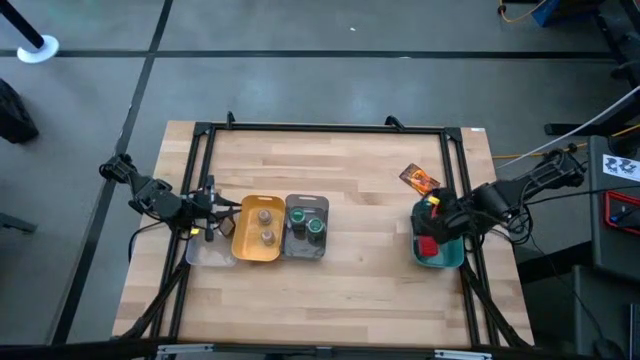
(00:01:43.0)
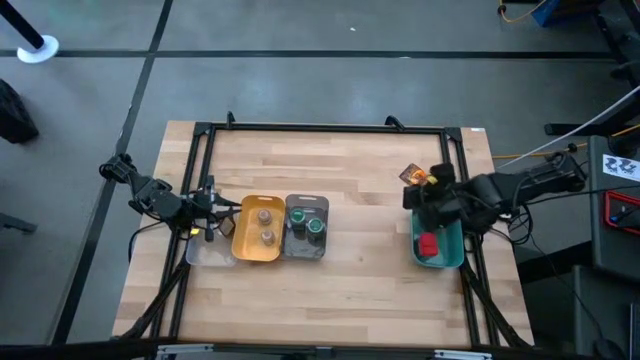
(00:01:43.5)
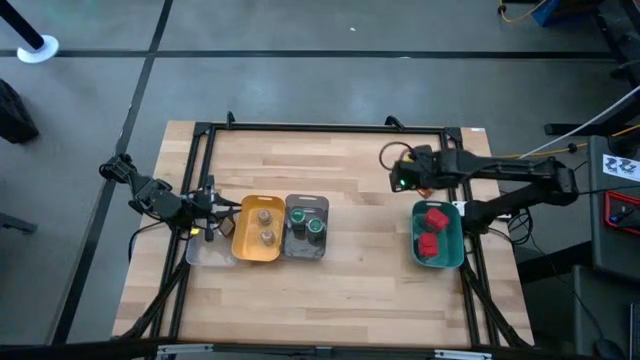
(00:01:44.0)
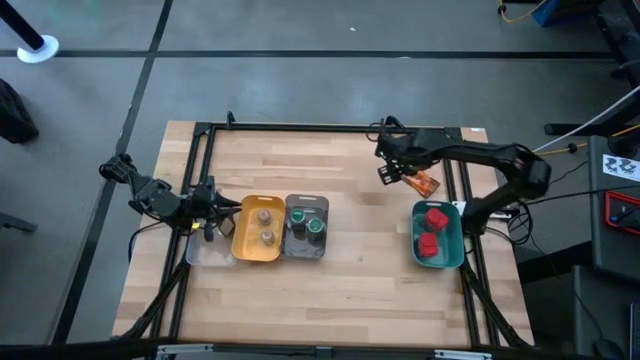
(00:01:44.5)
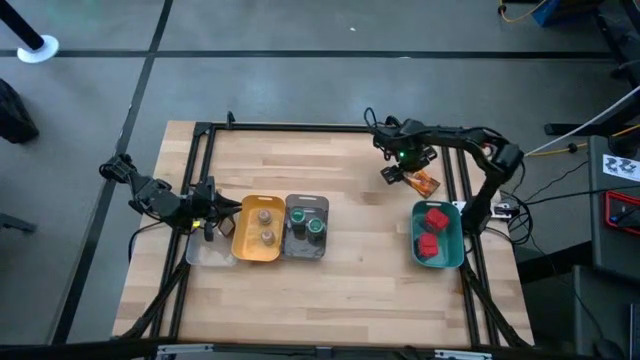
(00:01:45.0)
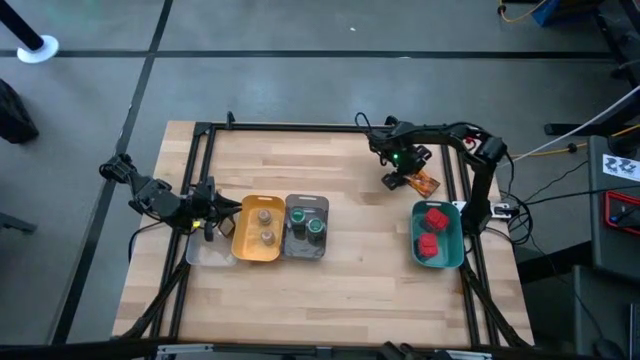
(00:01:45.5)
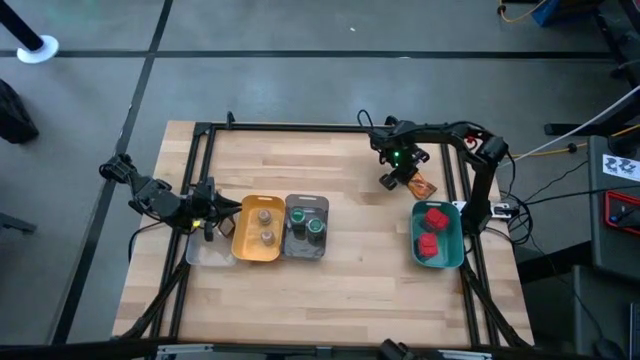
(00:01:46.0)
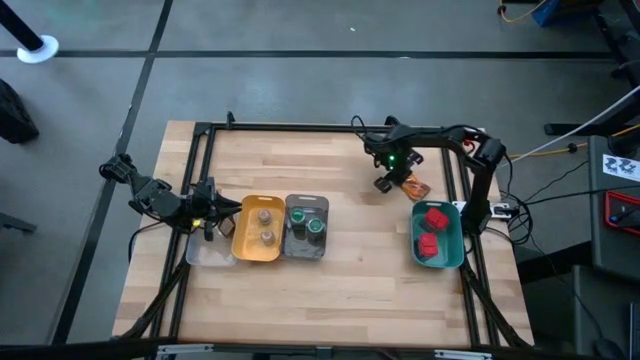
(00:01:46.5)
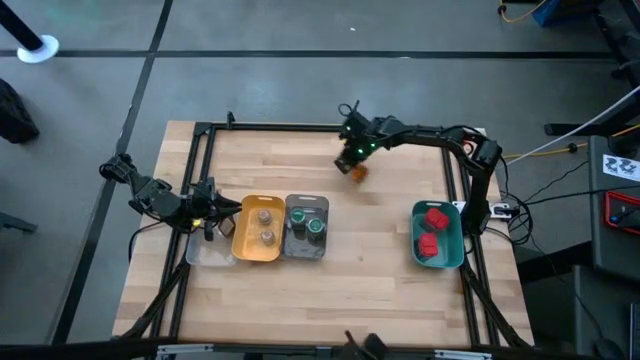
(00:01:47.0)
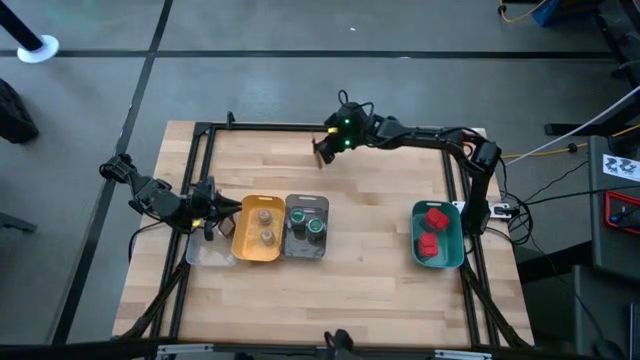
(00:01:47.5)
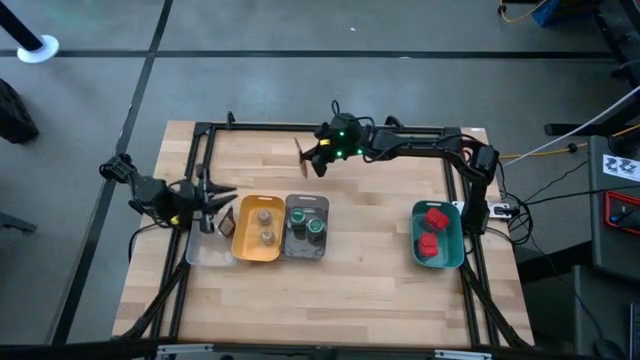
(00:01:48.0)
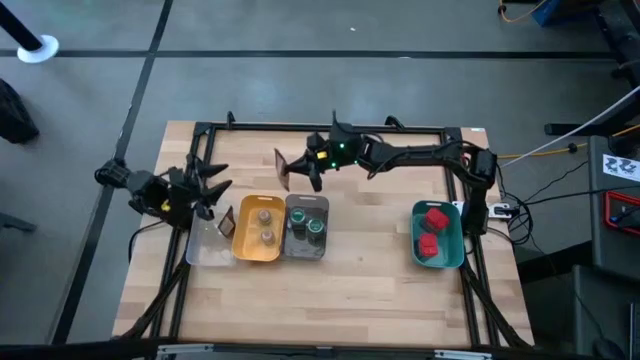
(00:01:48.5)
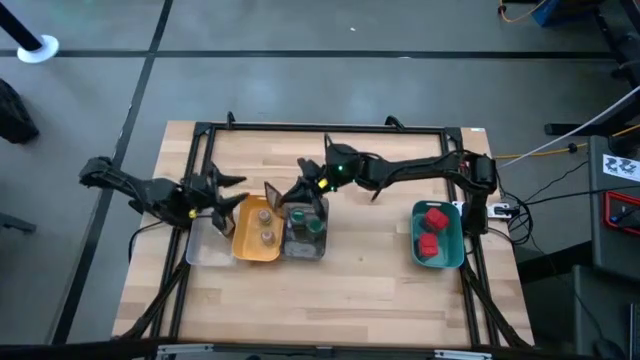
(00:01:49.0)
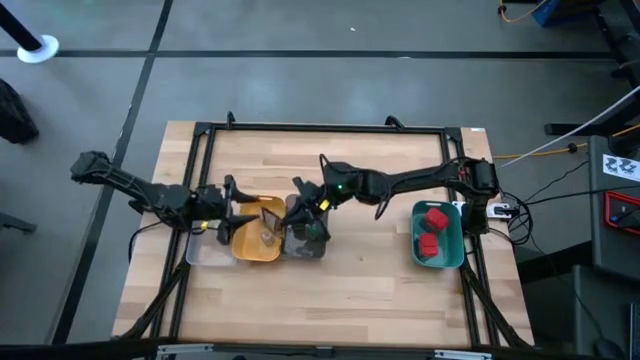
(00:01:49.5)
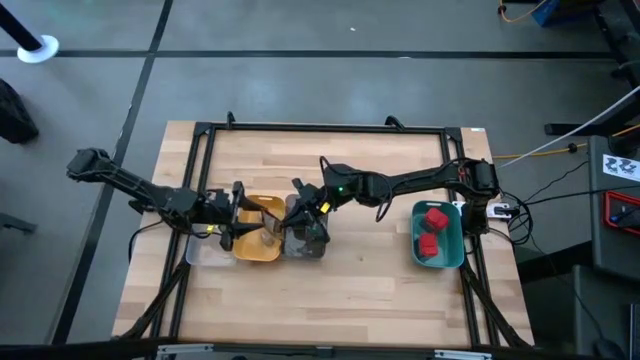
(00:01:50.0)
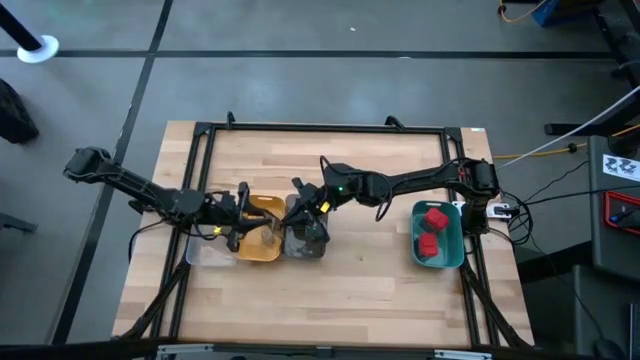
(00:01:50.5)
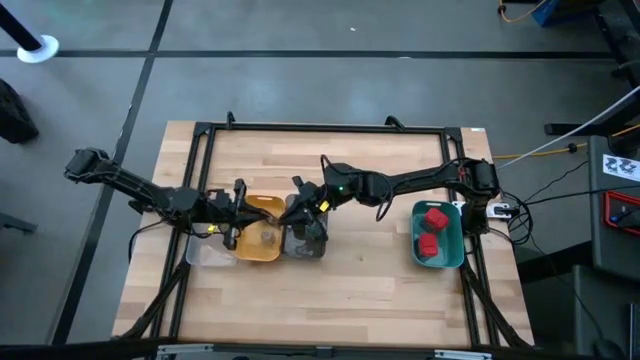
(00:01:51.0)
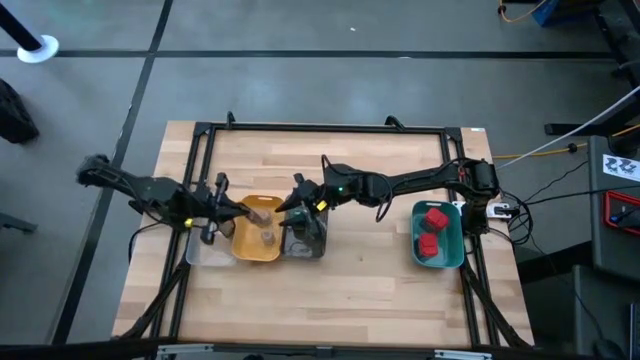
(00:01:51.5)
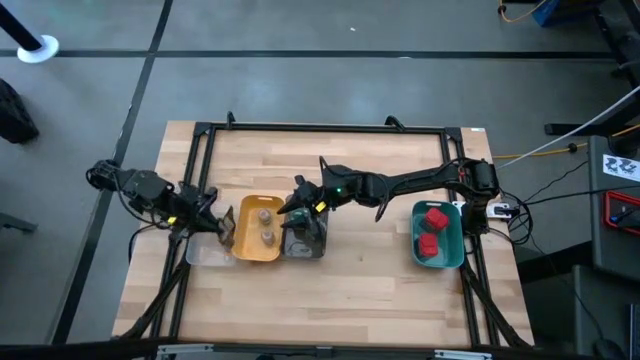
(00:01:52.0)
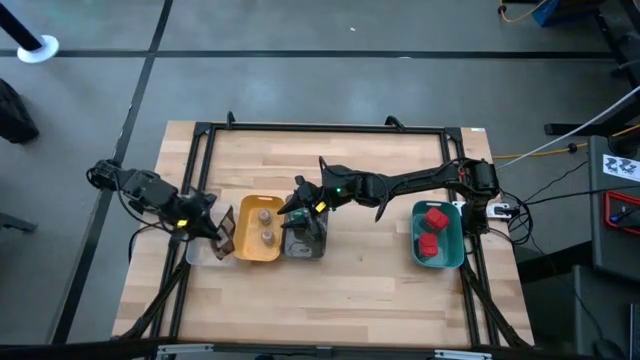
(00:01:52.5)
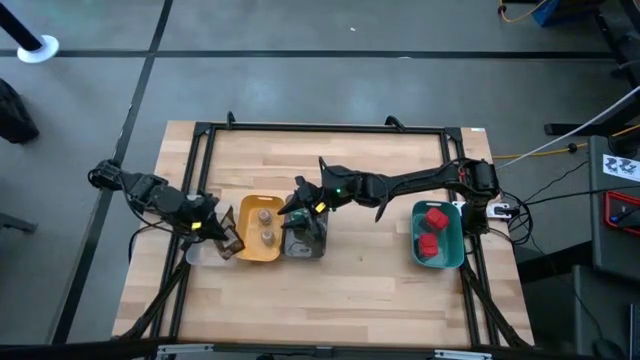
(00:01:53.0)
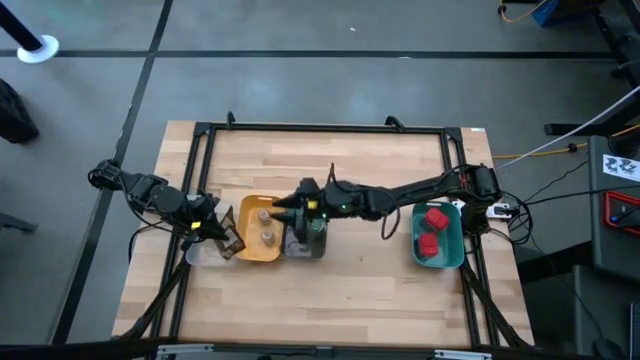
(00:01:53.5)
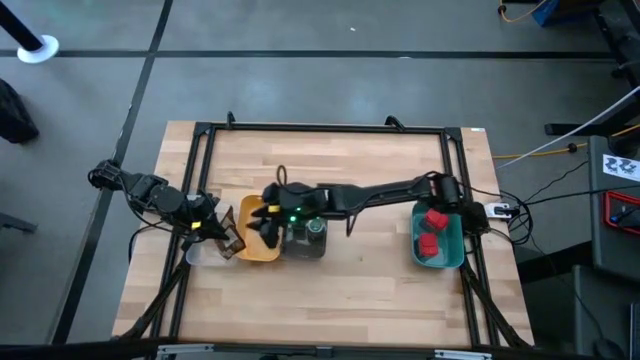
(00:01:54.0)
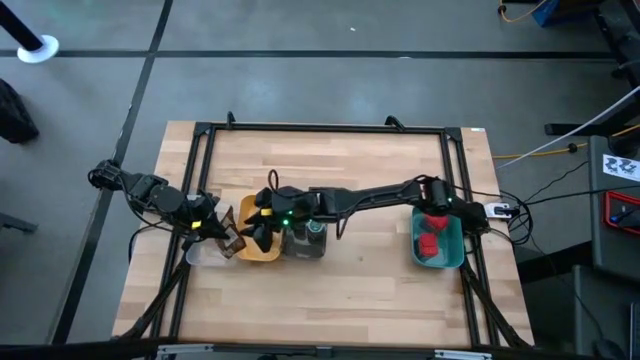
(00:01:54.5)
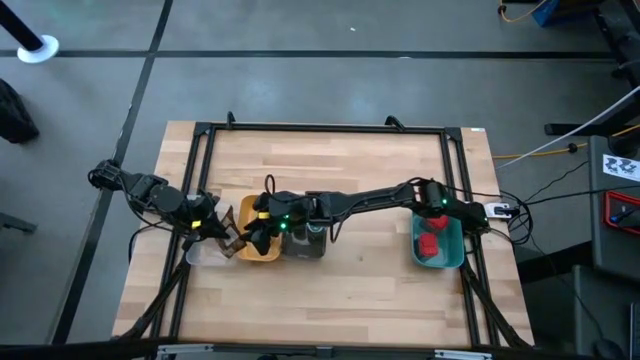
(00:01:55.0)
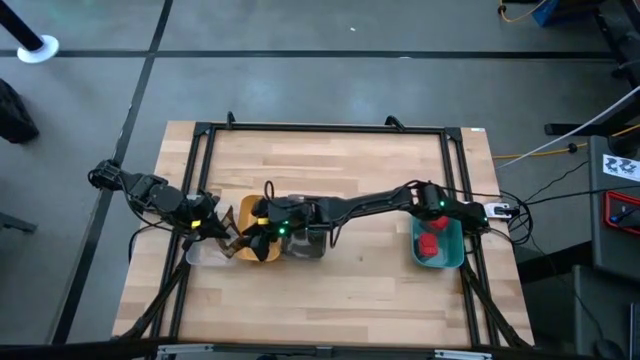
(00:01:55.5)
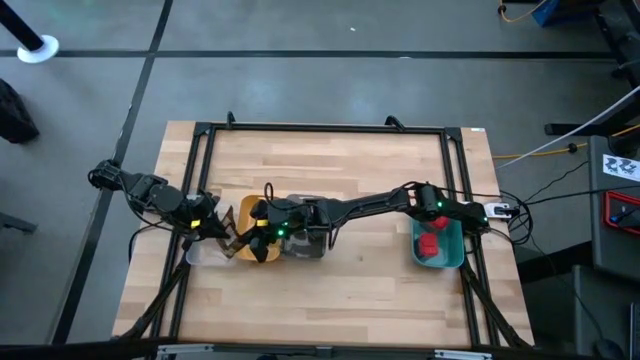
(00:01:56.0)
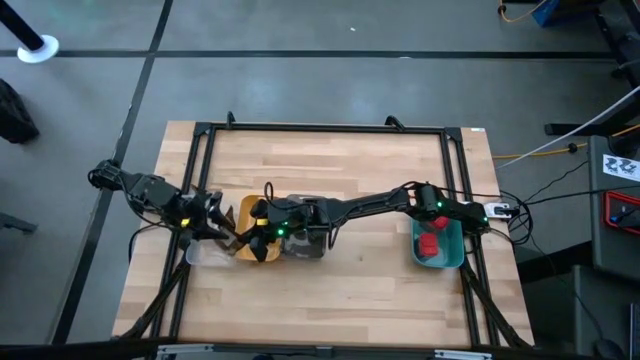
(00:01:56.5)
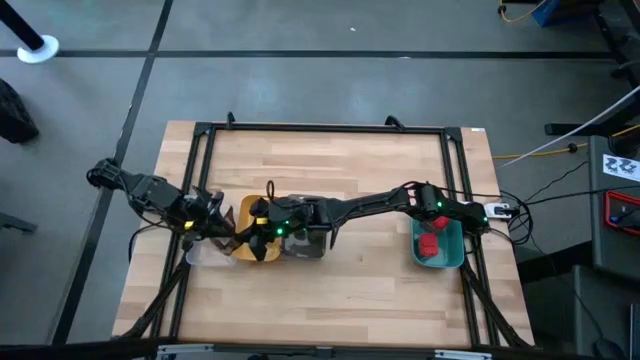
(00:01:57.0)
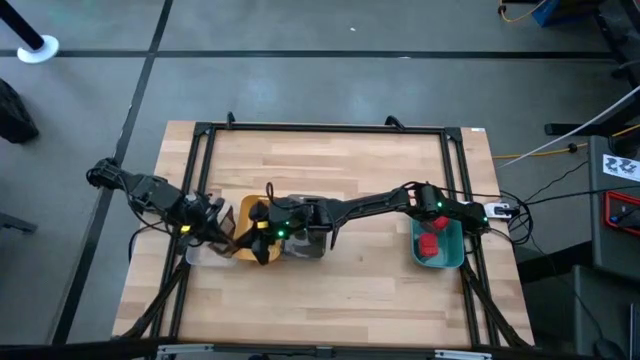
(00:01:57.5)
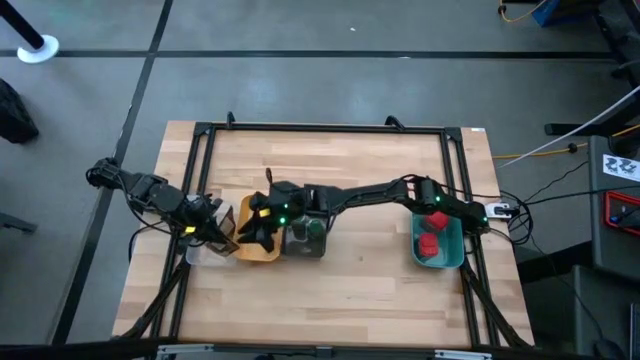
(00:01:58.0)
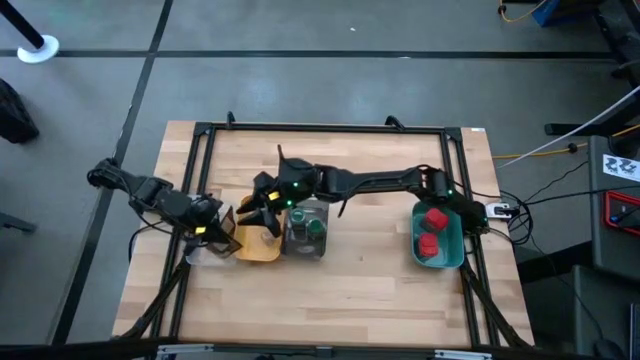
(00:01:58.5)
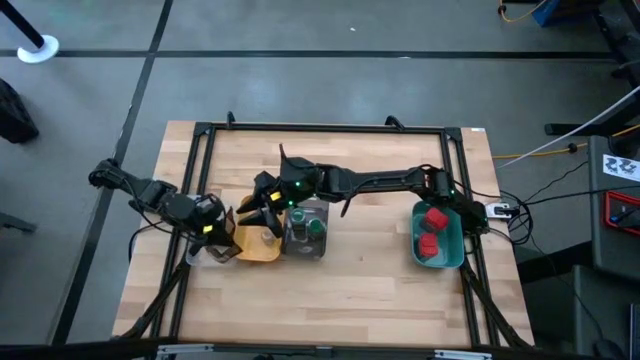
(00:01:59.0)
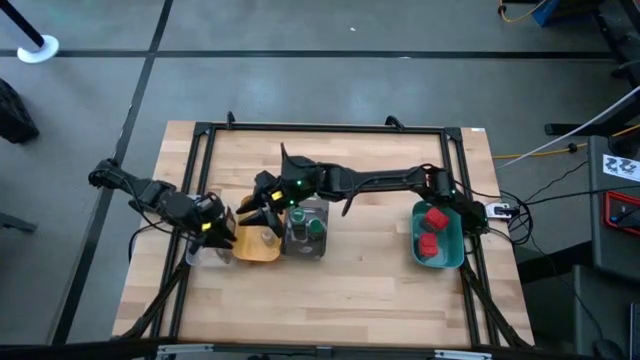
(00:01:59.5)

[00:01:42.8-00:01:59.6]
Task: Sort spices by type
Put the orange spice bag into the transparent bin

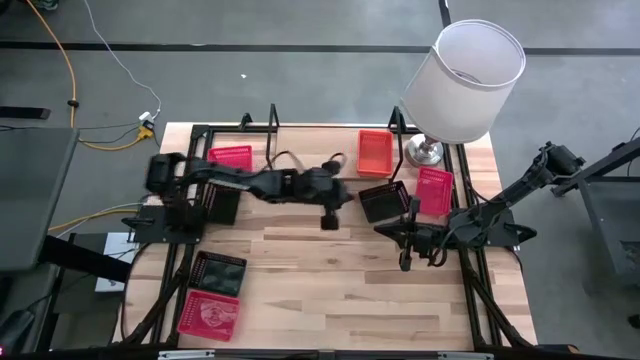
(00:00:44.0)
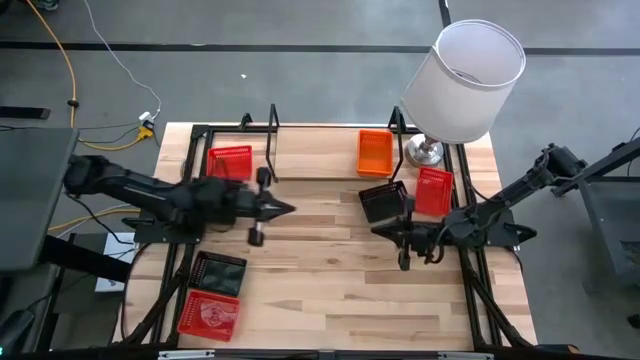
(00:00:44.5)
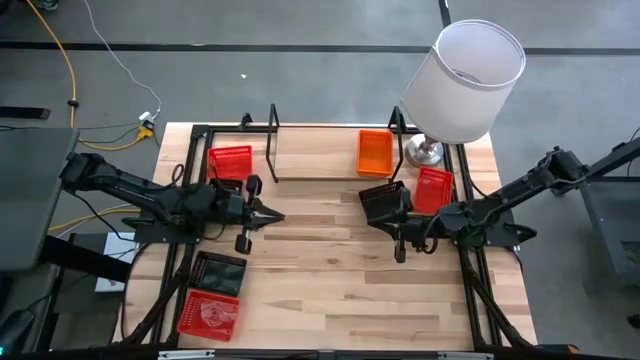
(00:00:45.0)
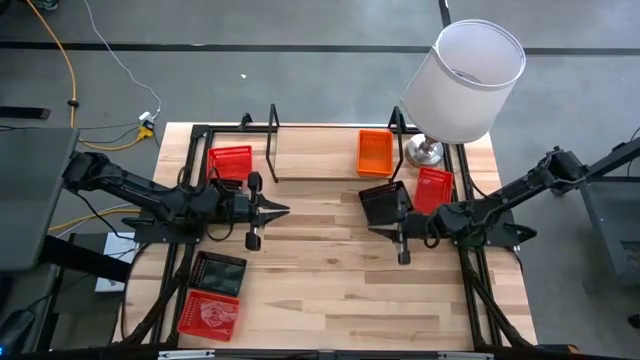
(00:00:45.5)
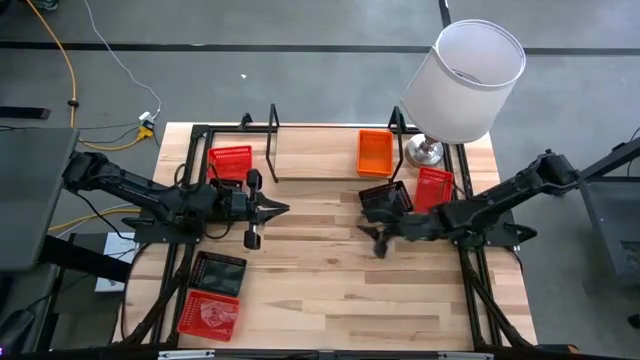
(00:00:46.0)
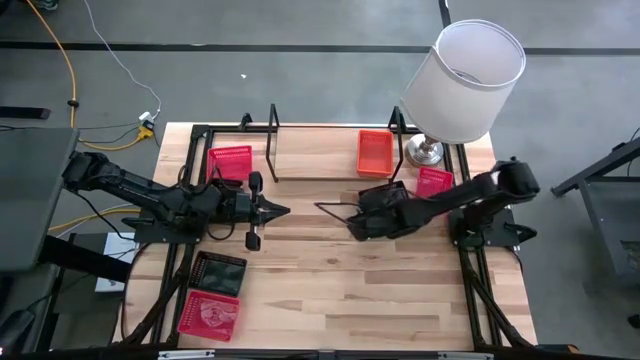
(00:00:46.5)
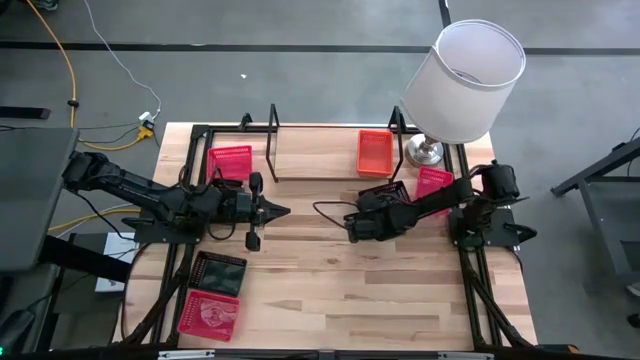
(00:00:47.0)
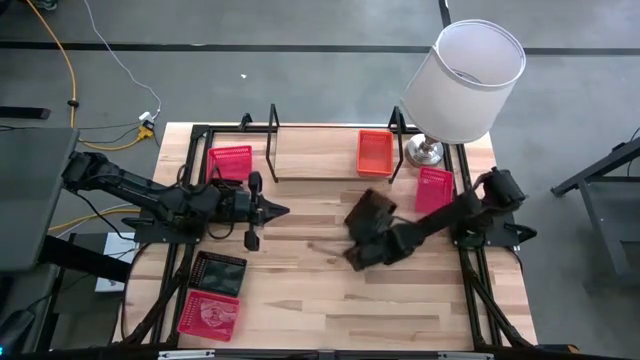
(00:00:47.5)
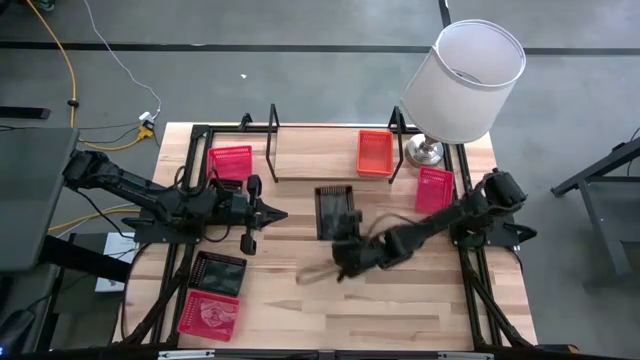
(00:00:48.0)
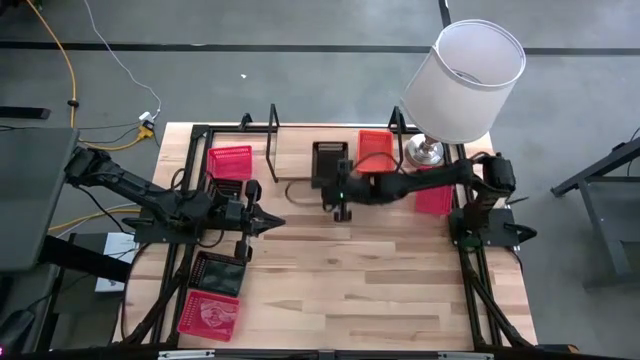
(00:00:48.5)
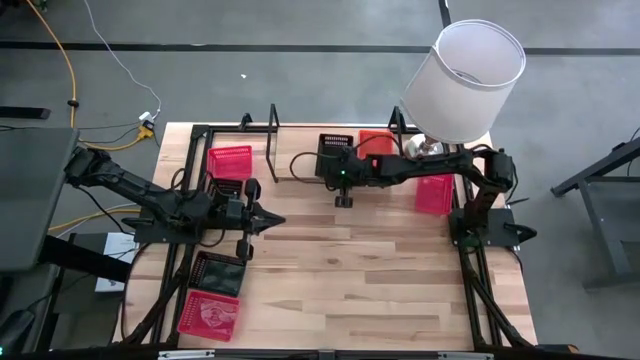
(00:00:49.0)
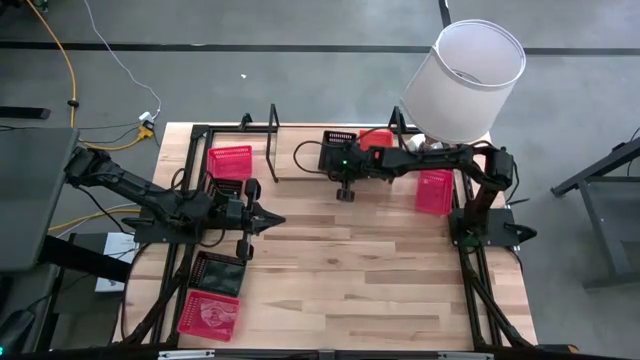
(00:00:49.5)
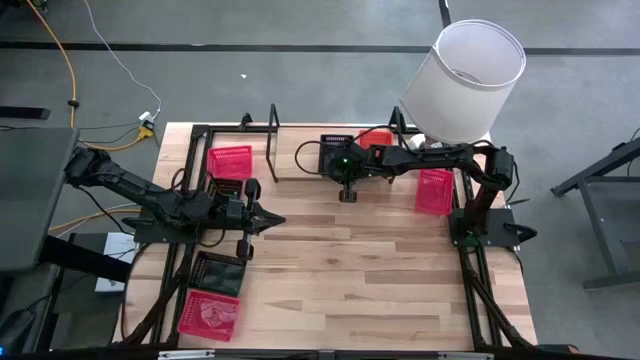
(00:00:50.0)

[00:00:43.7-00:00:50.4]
Task: Stack baskets on shelf by color
Put the top right black basket on the shelf
